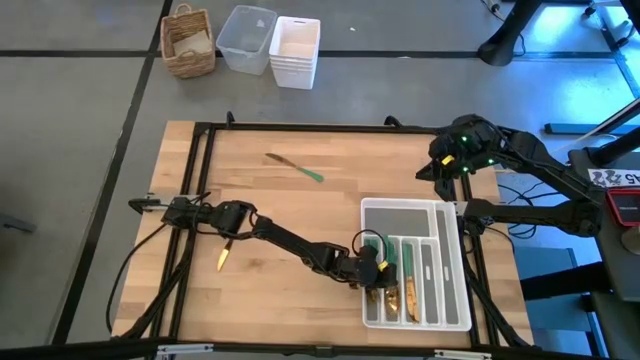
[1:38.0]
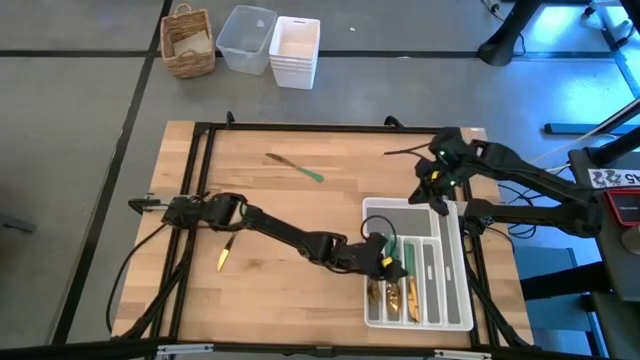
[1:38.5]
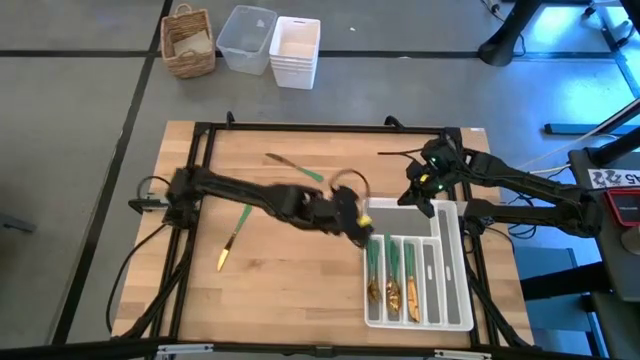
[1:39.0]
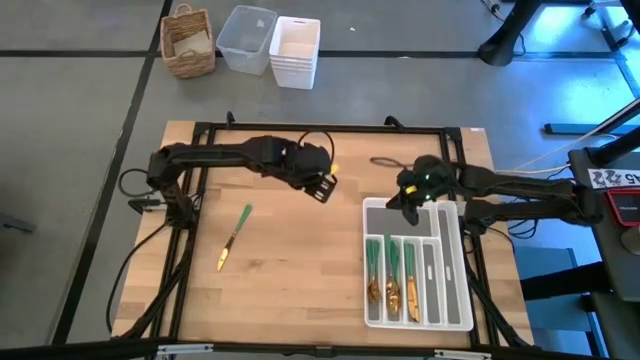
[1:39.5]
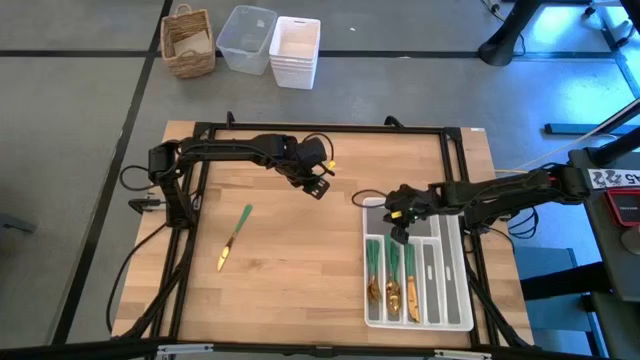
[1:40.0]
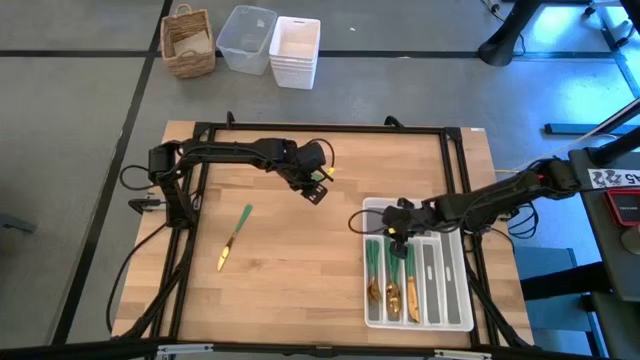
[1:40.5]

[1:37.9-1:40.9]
Task: Sort silverware
Adjust the white silverware tray

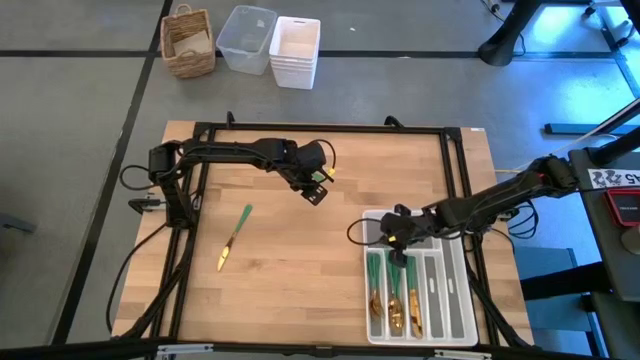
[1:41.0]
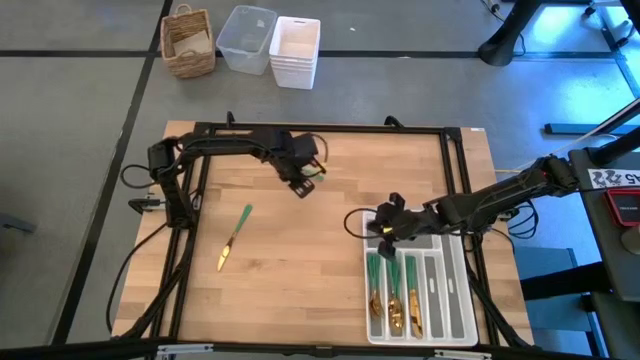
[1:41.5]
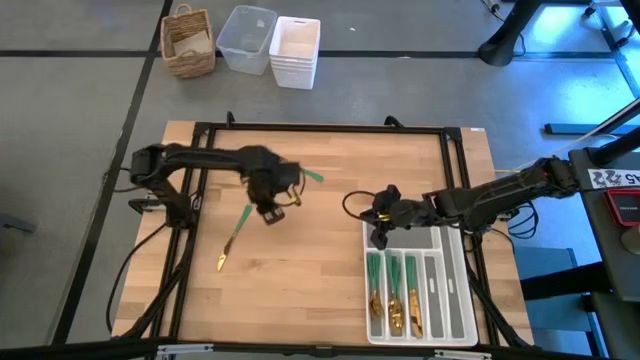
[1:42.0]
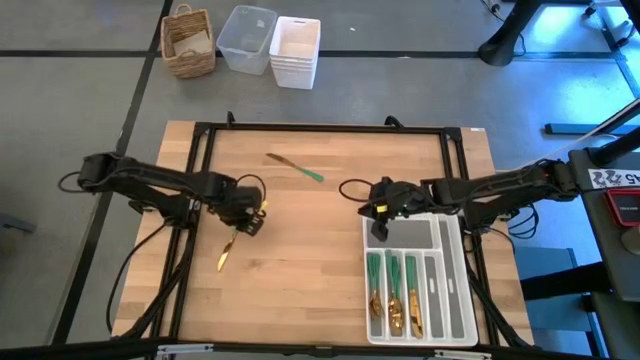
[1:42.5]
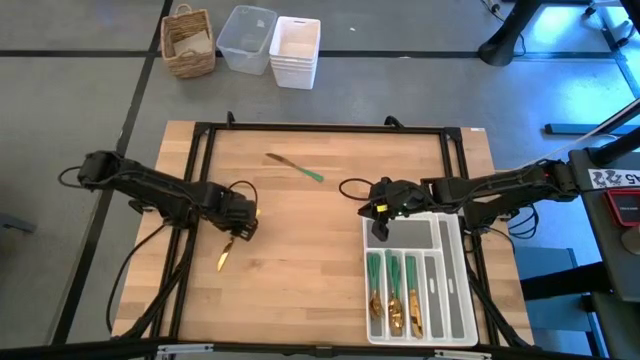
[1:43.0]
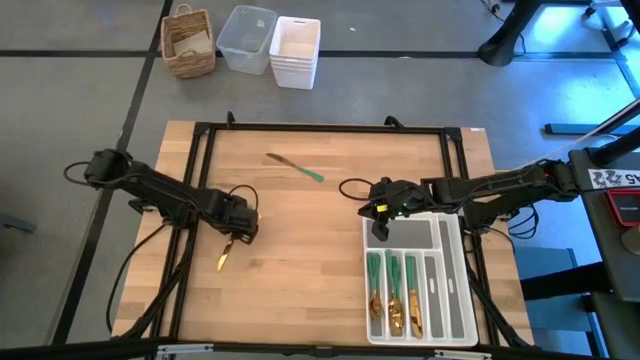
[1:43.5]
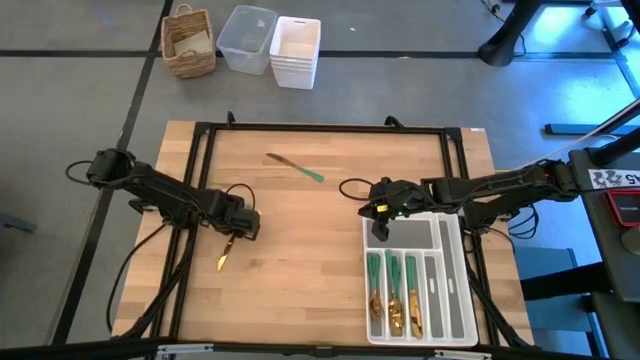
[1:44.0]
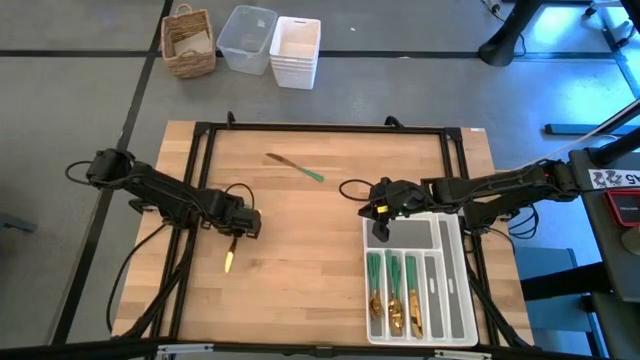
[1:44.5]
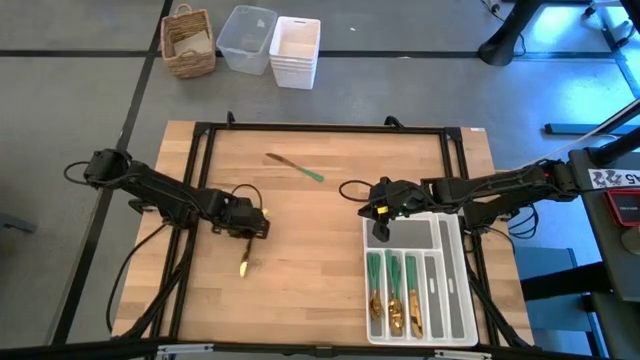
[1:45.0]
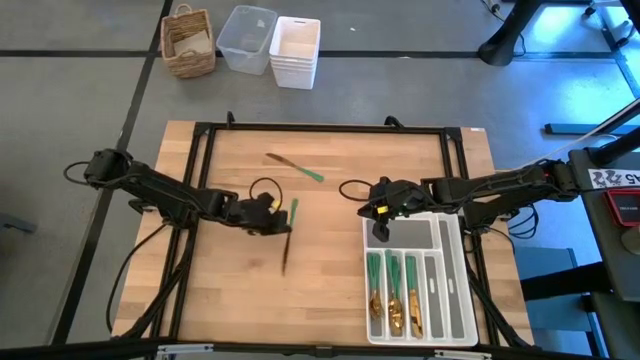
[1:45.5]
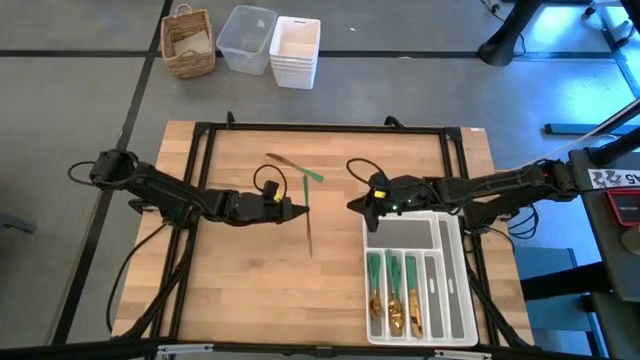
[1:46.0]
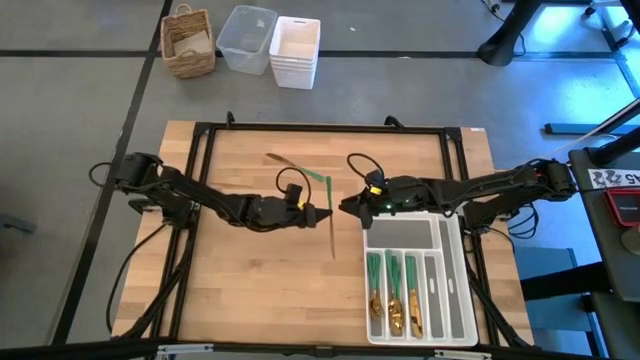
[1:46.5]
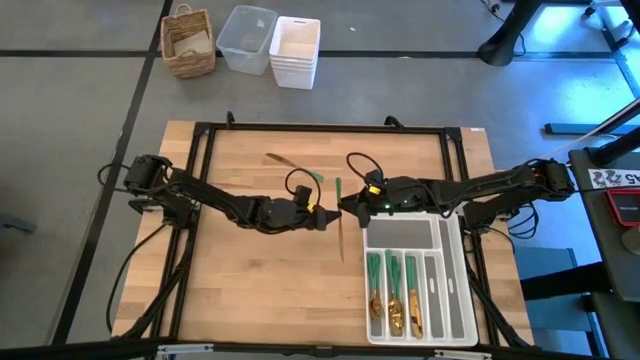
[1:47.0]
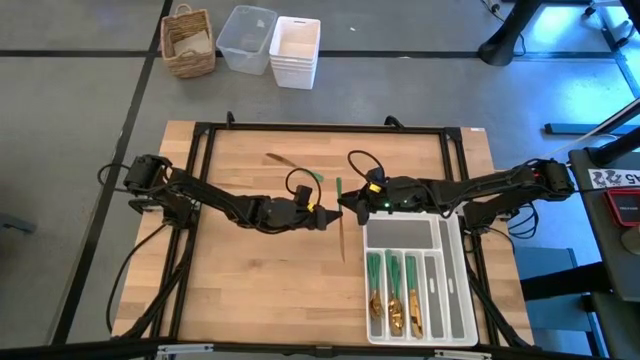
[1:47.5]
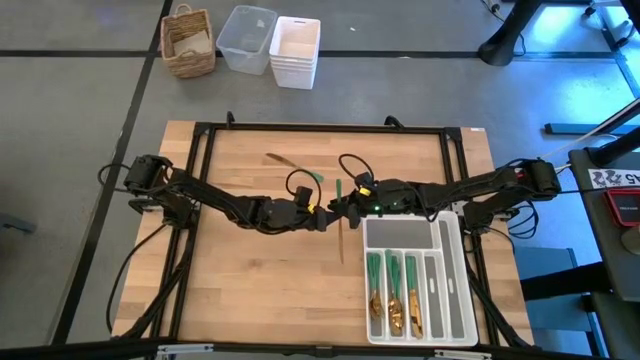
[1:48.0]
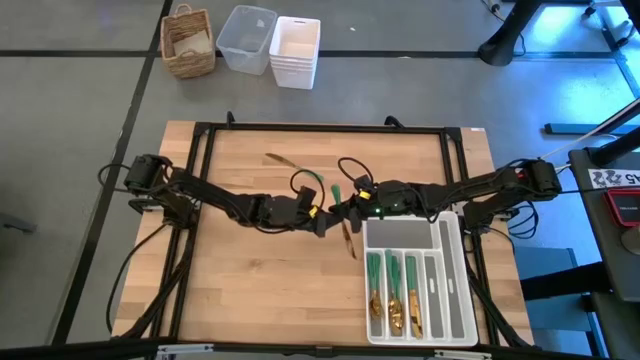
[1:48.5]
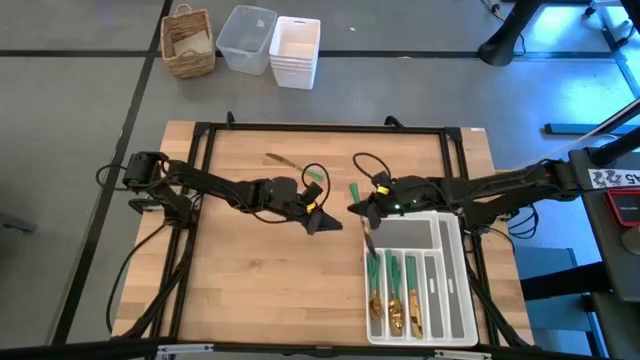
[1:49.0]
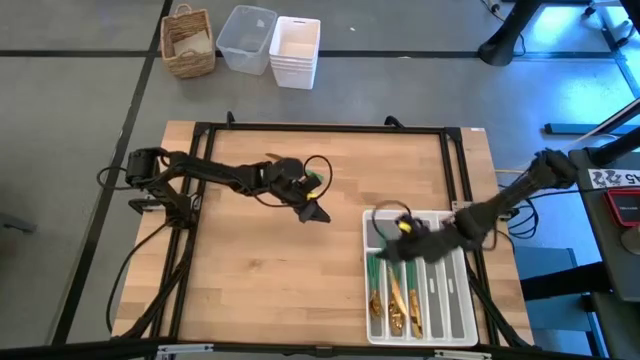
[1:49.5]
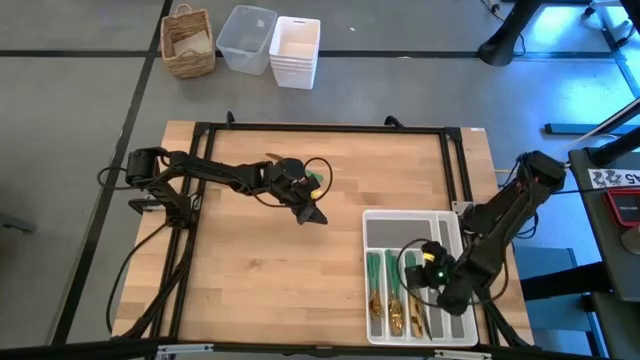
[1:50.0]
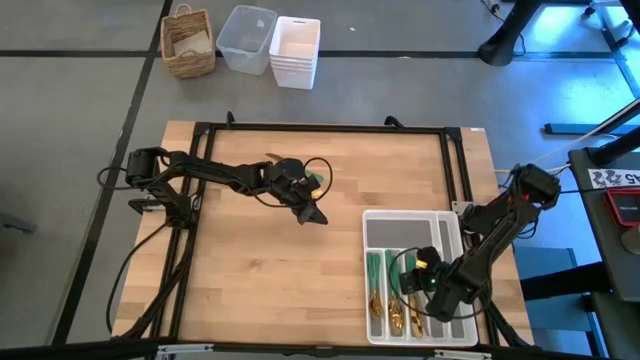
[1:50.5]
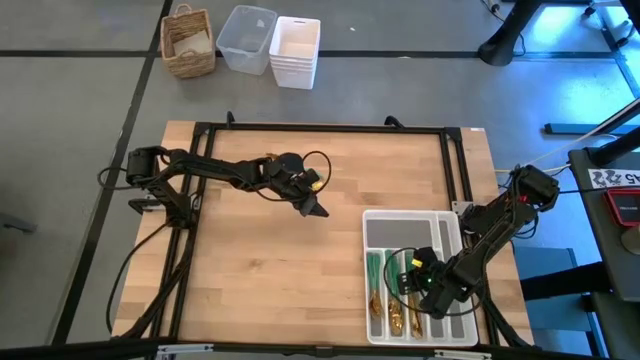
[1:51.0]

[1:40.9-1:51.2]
Put the green table knife into the white silverware tray

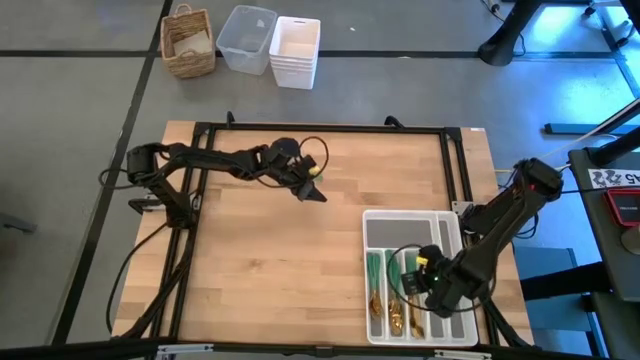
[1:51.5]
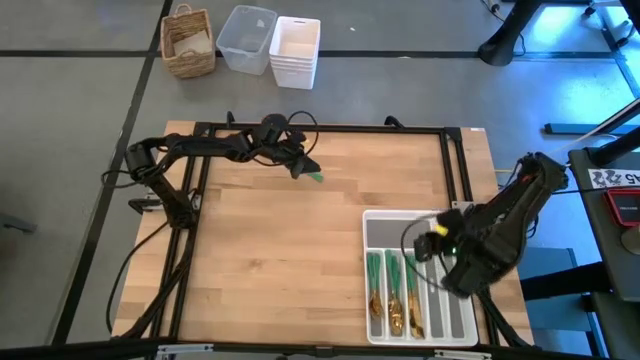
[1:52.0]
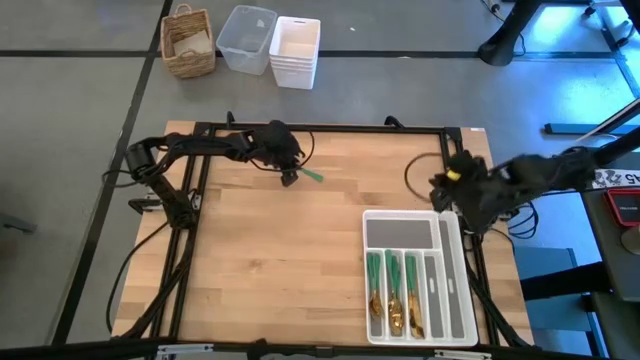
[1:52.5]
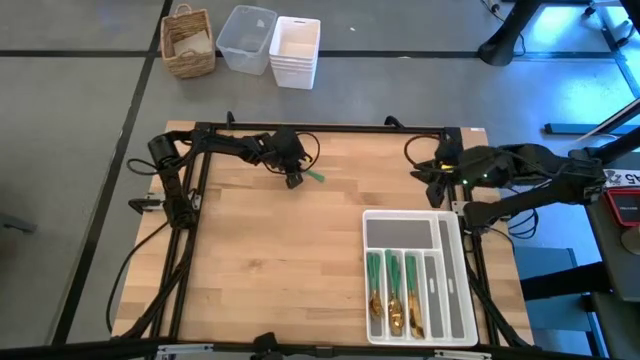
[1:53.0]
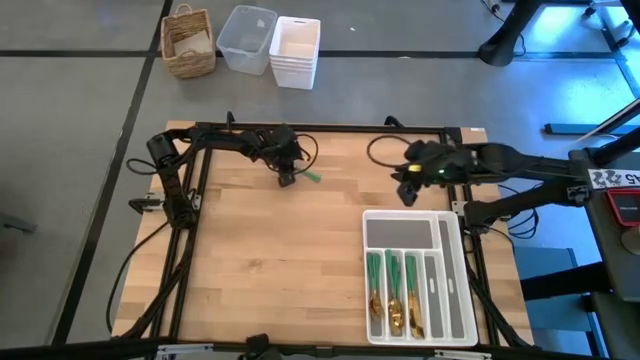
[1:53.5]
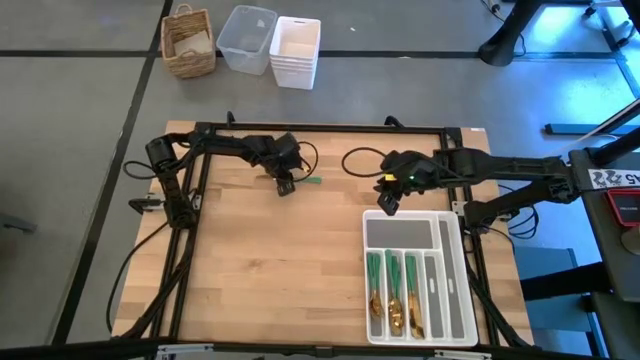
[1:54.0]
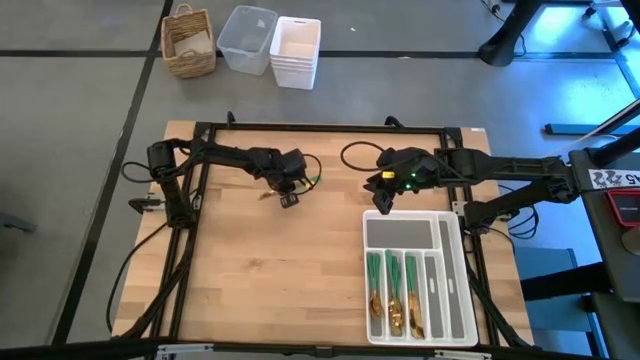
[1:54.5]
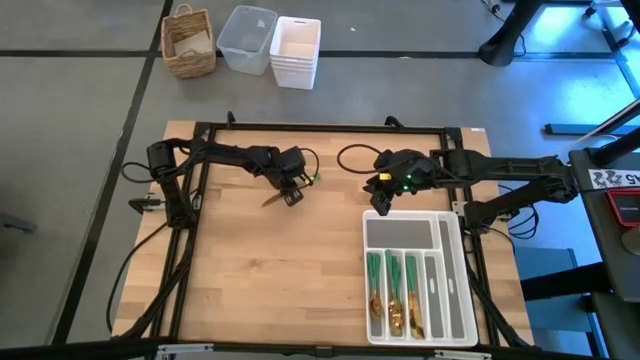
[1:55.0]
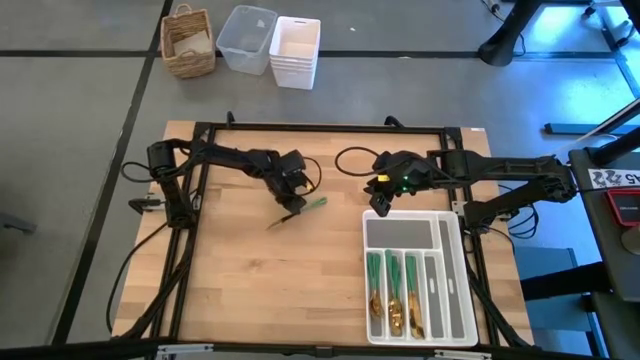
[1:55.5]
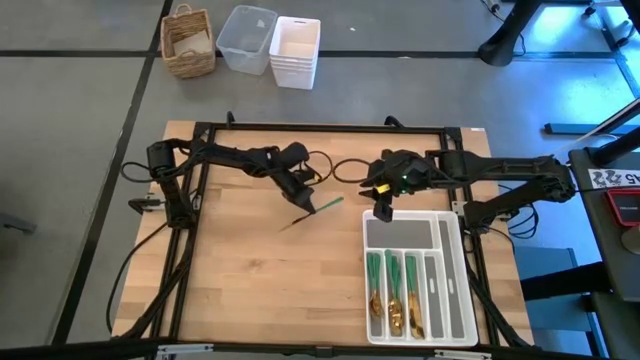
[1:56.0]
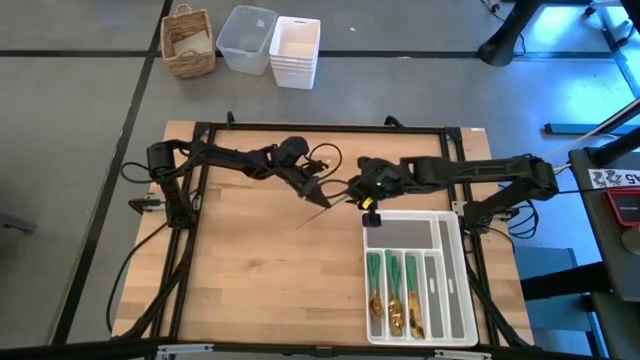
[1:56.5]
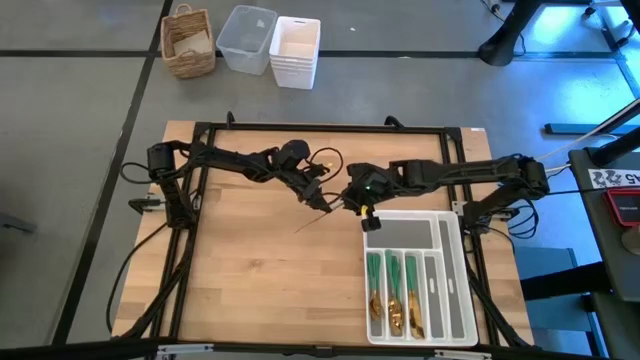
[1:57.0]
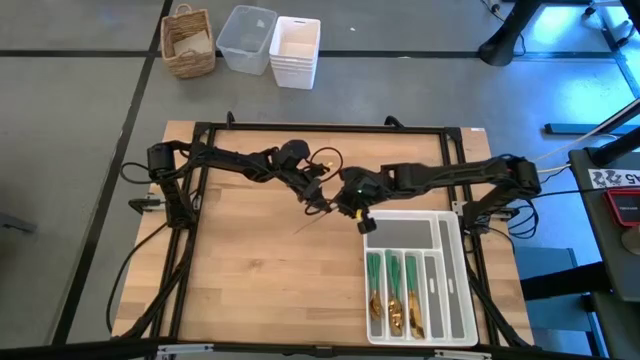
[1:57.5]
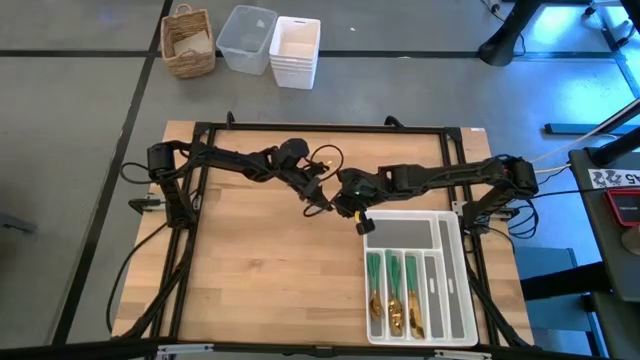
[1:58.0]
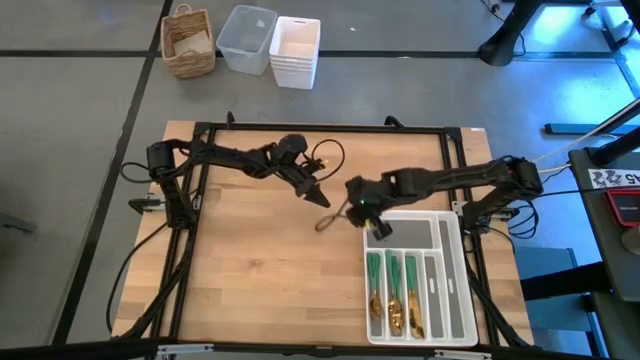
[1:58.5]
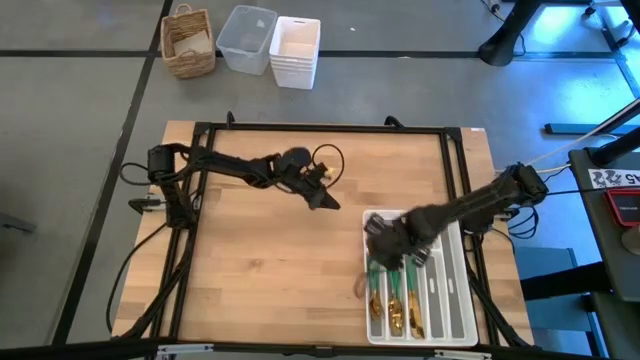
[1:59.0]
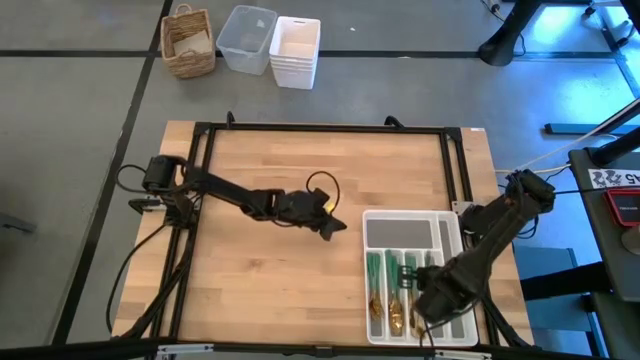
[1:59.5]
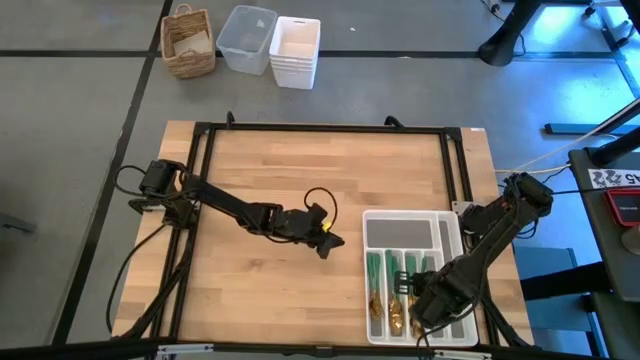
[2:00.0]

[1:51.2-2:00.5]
Put the green table knife into the white silverware tray
